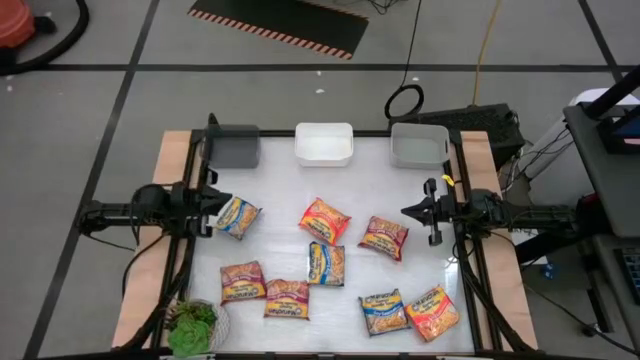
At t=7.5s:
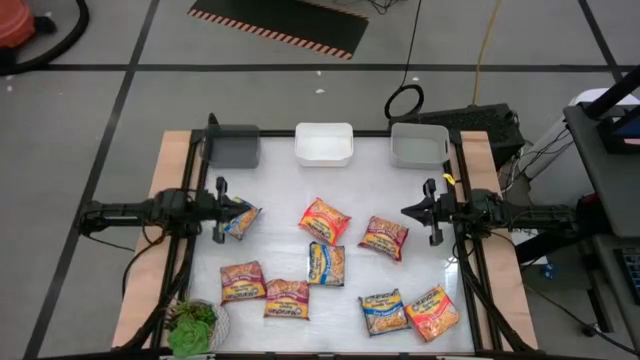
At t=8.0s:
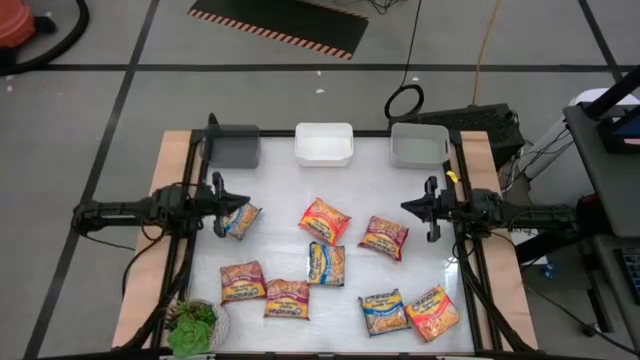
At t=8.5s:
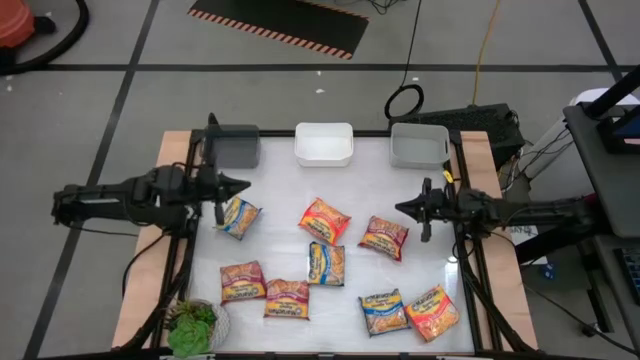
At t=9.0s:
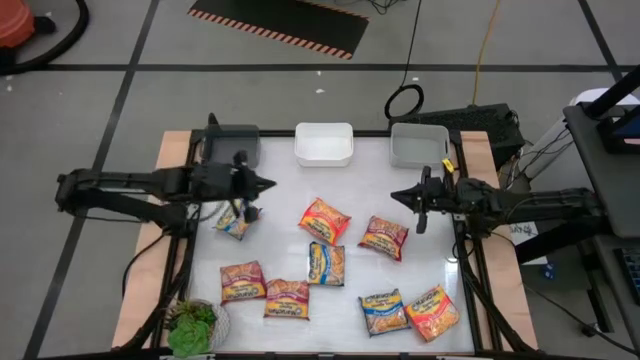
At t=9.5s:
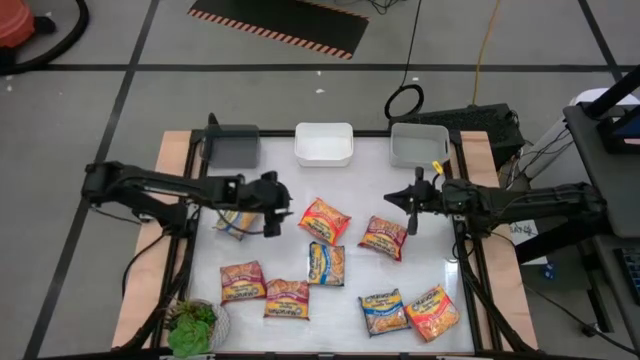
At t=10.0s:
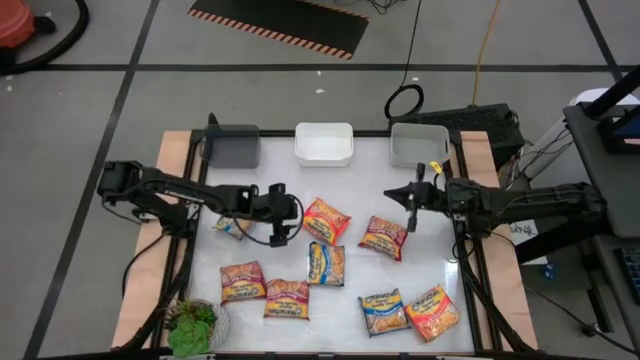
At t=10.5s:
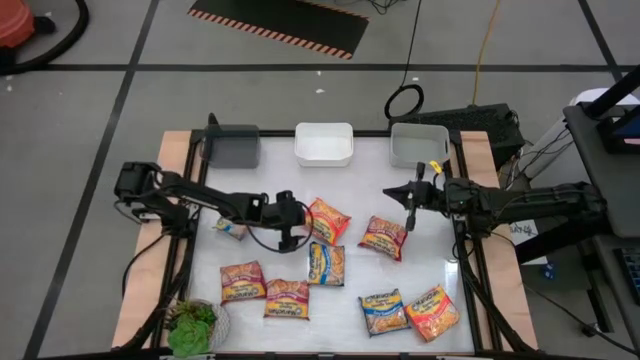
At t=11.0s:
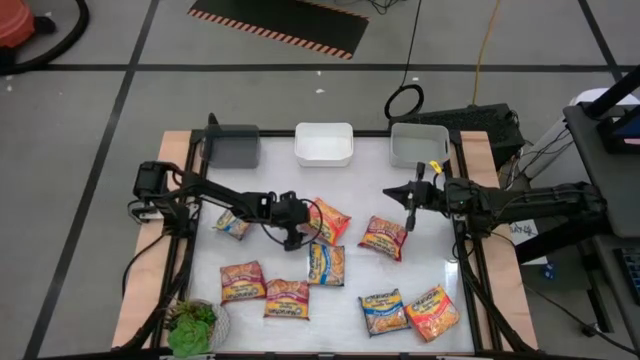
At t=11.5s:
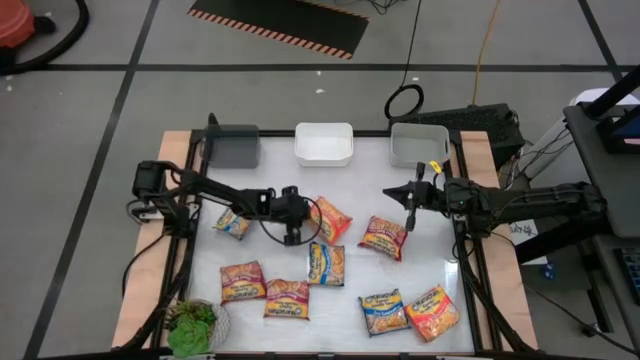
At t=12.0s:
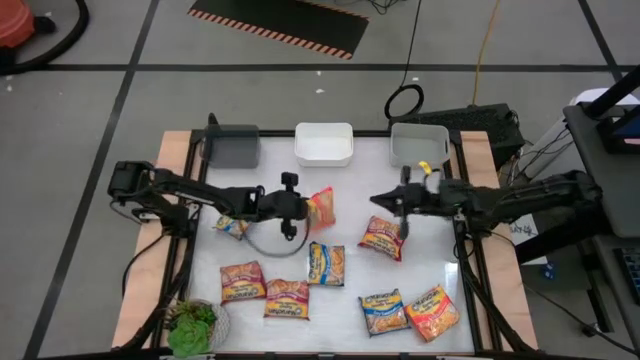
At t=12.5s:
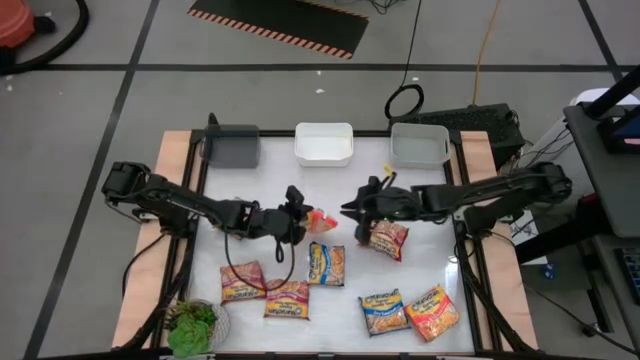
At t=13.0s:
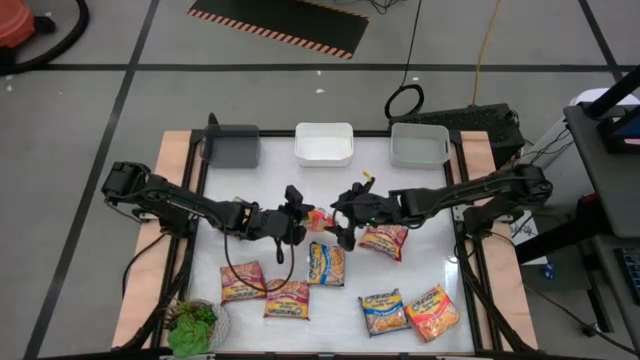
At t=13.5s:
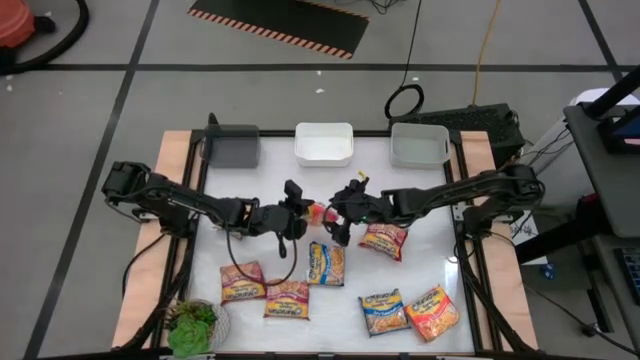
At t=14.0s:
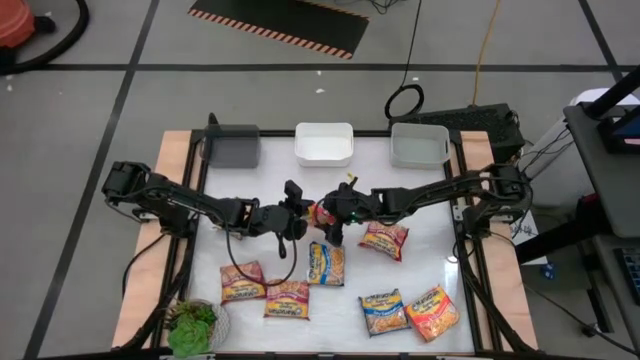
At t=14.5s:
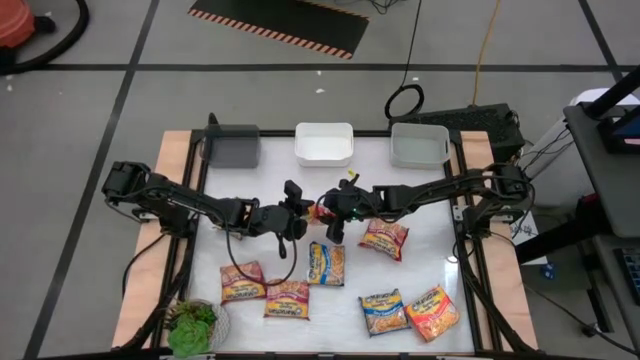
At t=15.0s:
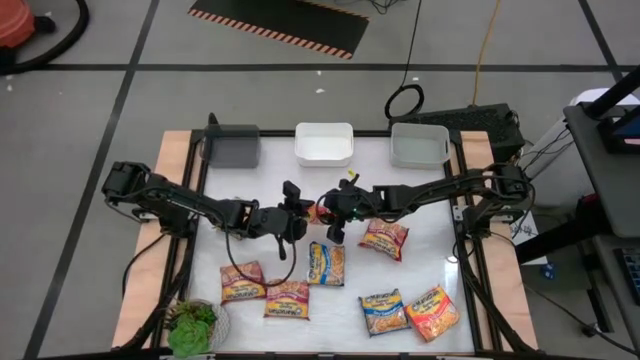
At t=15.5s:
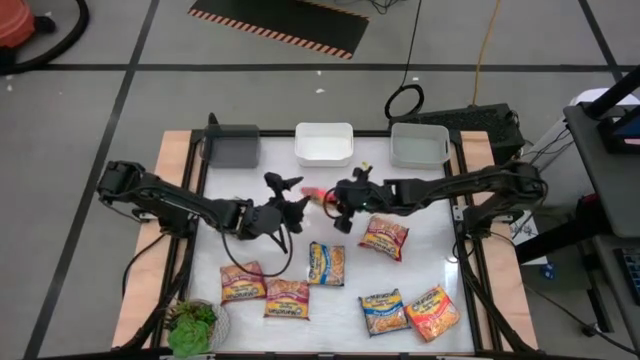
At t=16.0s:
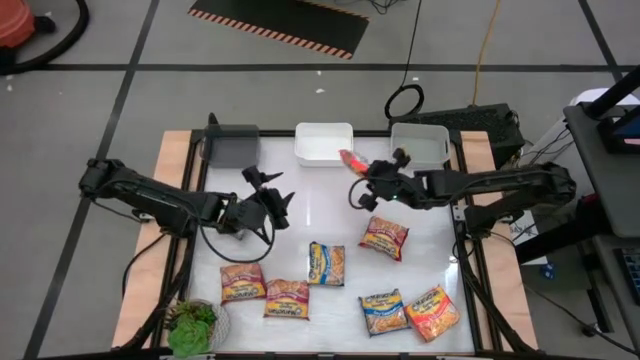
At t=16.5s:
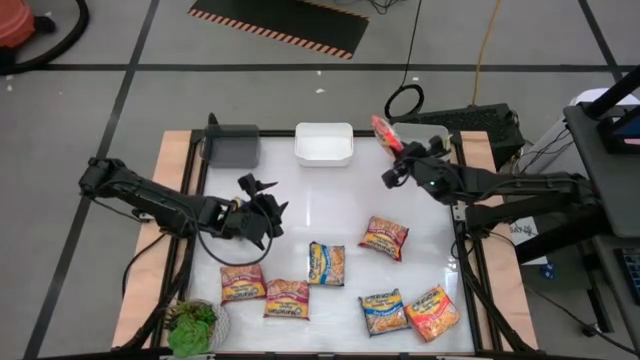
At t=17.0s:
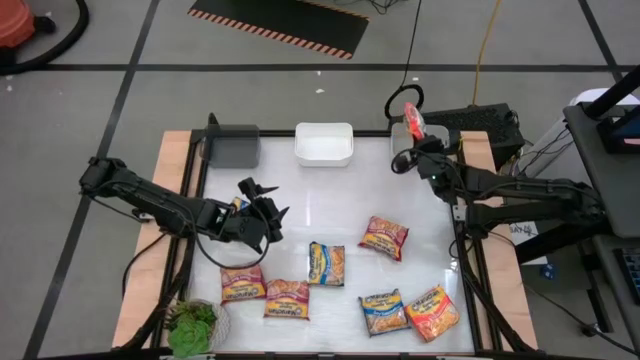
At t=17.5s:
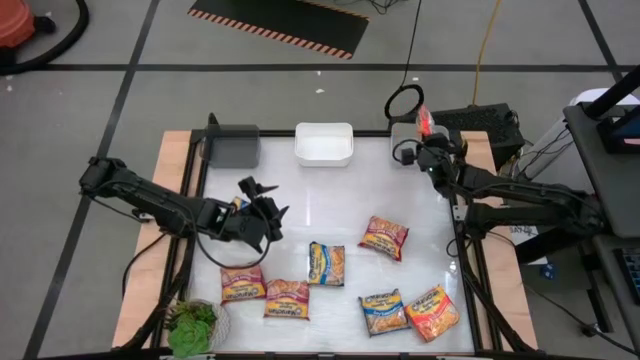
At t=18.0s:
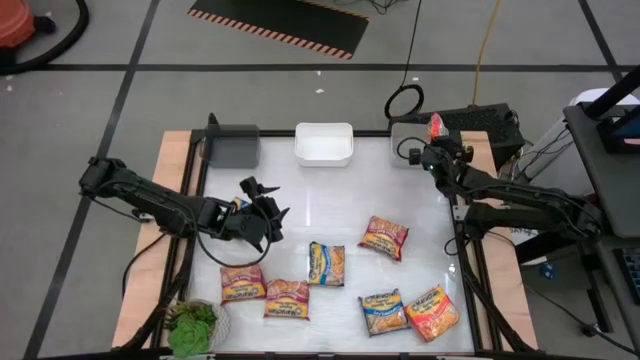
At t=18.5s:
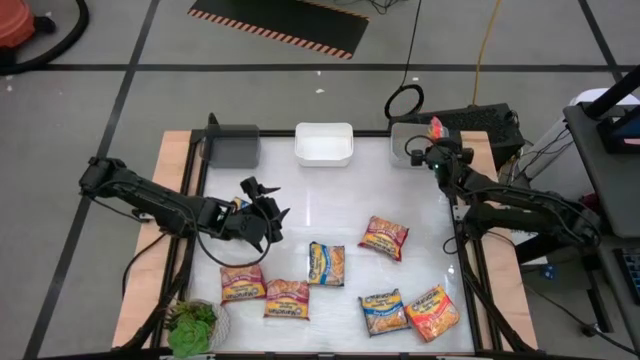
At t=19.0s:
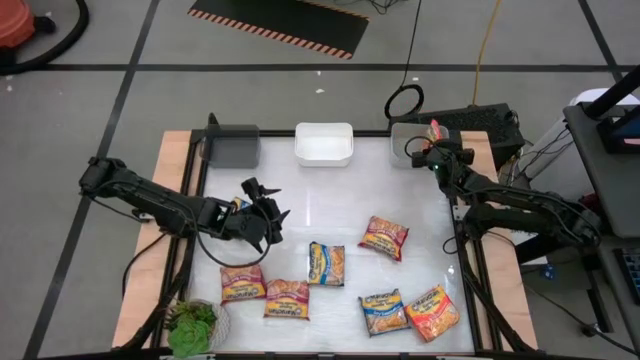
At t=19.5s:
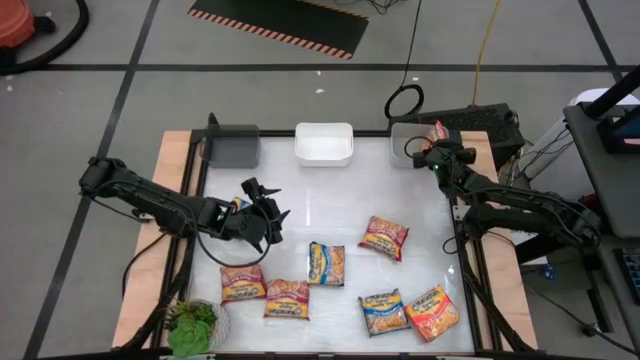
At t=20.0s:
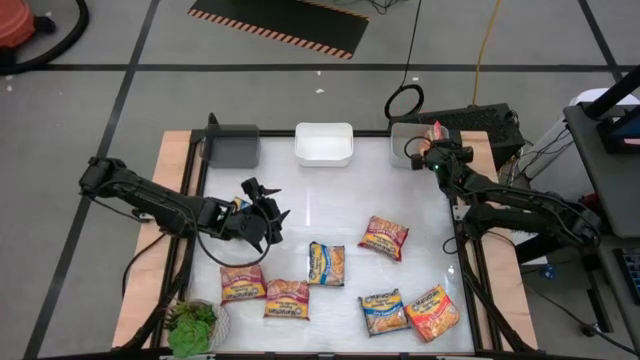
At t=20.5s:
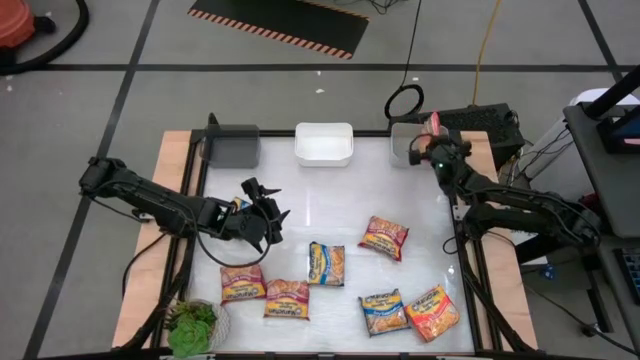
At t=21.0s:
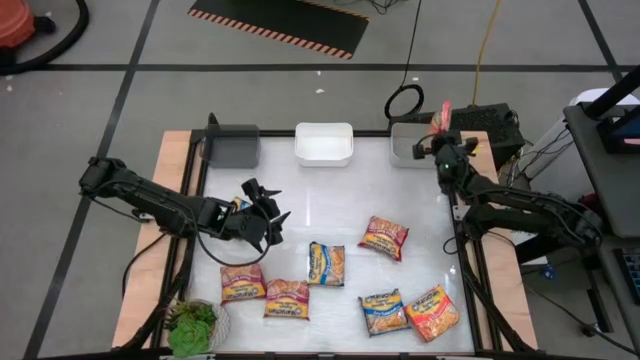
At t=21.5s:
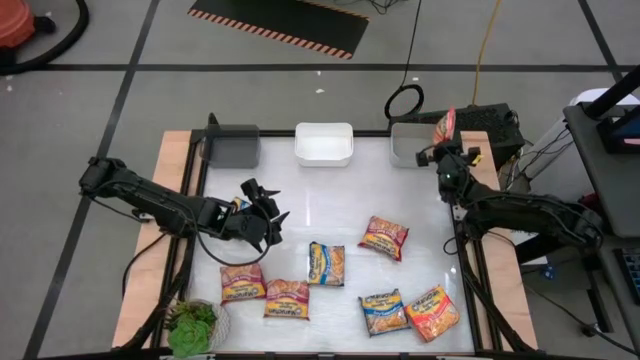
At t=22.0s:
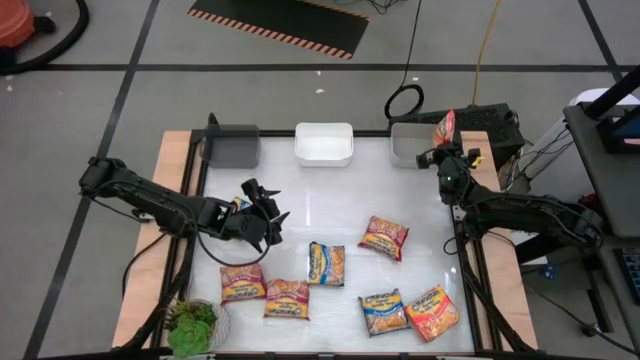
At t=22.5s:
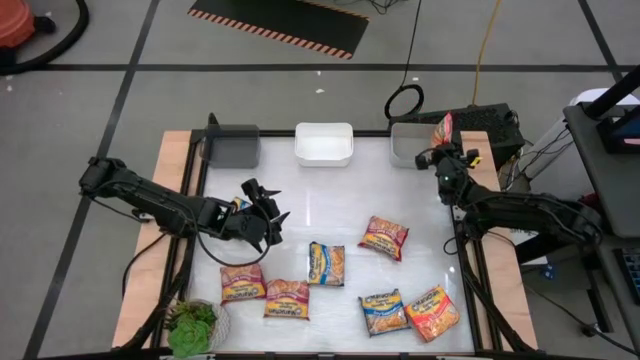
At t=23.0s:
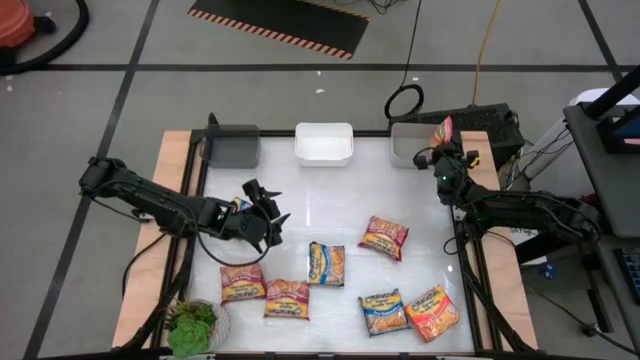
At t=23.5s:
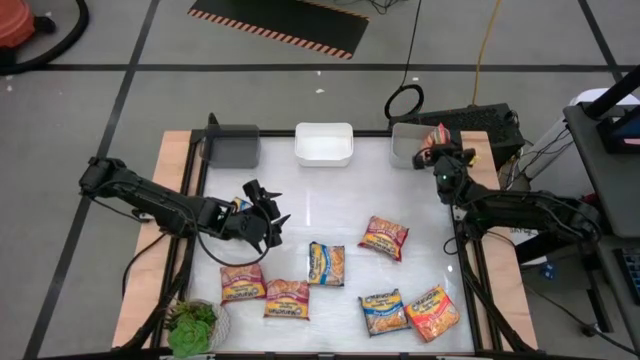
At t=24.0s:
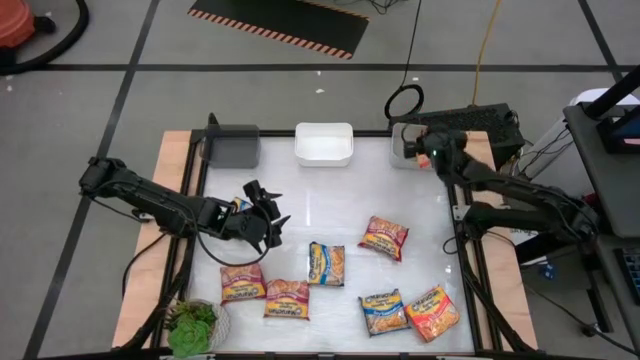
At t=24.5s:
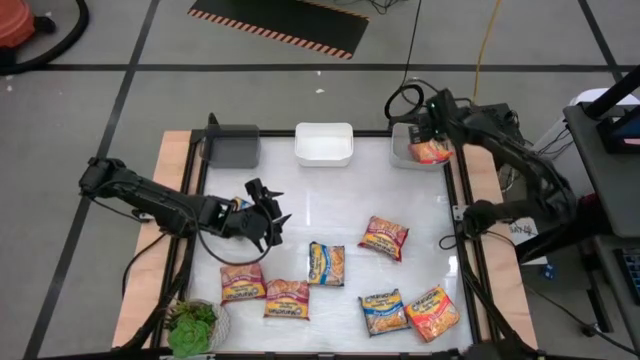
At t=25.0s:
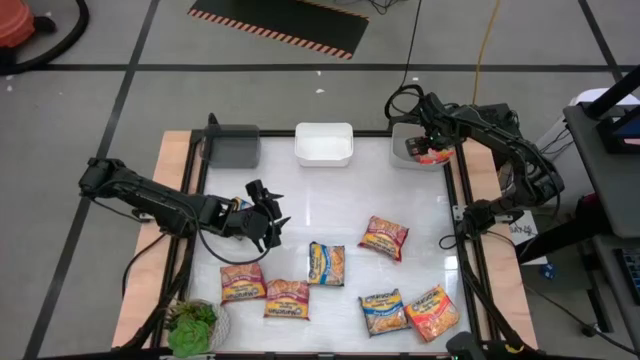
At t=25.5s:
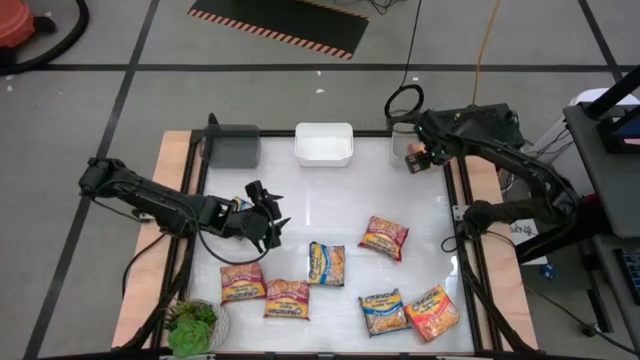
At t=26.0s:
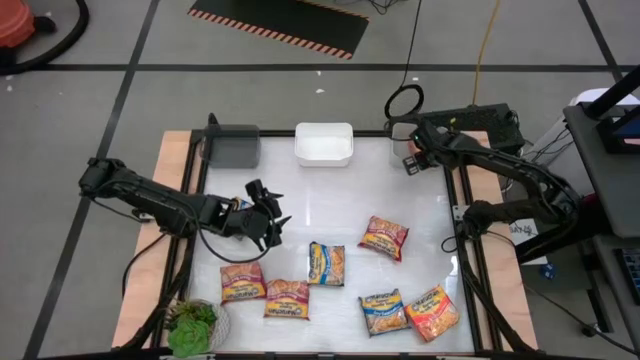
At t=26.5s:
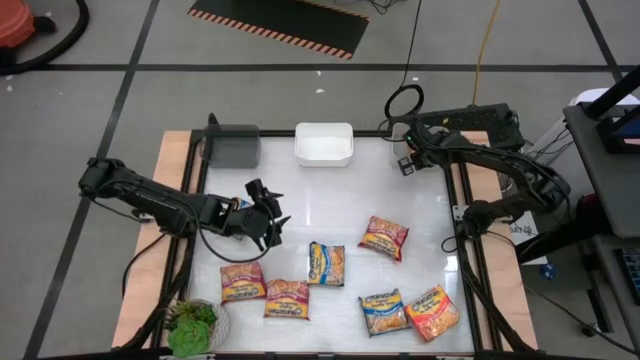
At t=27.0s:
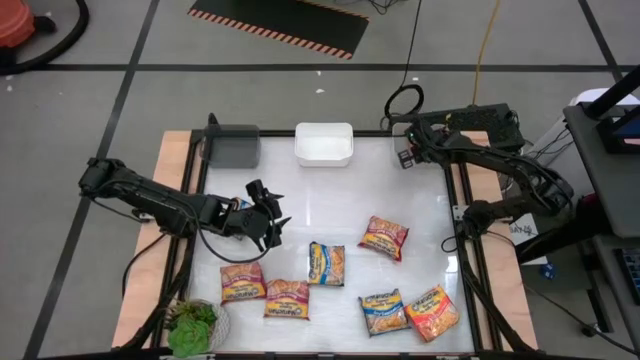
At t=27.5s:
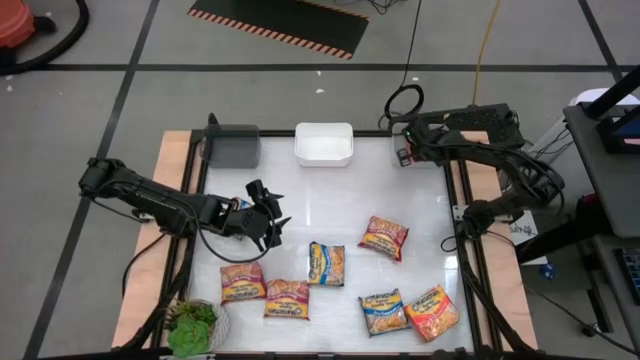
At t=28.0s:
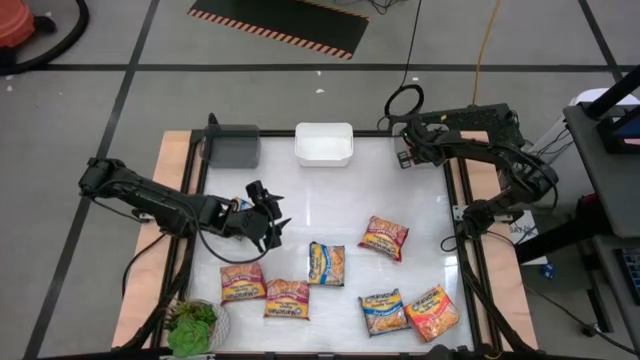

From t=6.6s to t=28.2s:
Task: Sort Maruchan noodles
Put the top orange noodle pack into the gray bin
